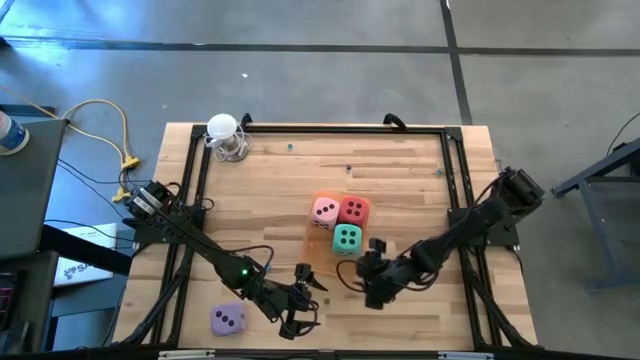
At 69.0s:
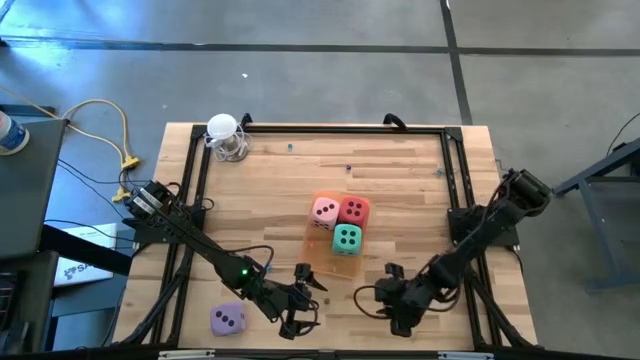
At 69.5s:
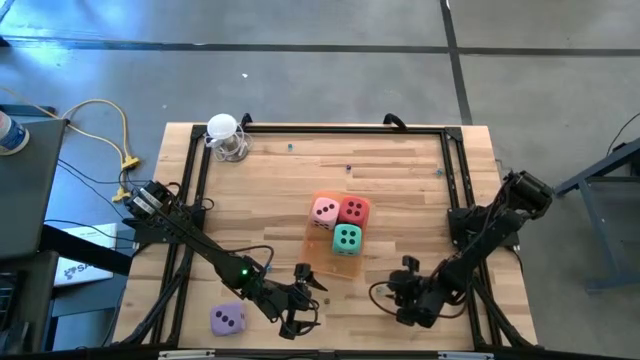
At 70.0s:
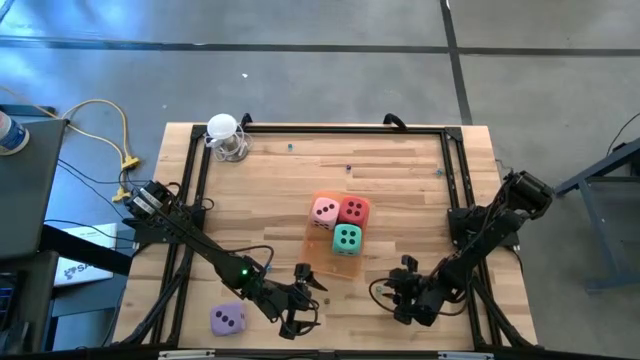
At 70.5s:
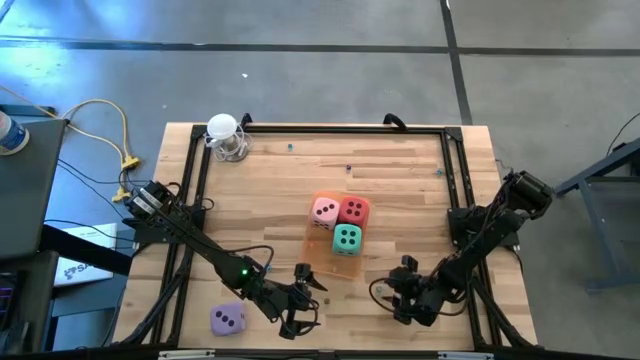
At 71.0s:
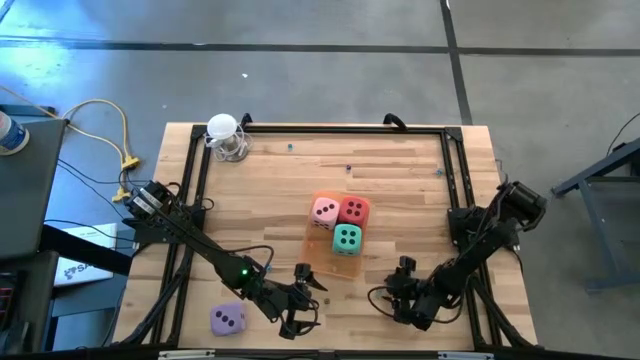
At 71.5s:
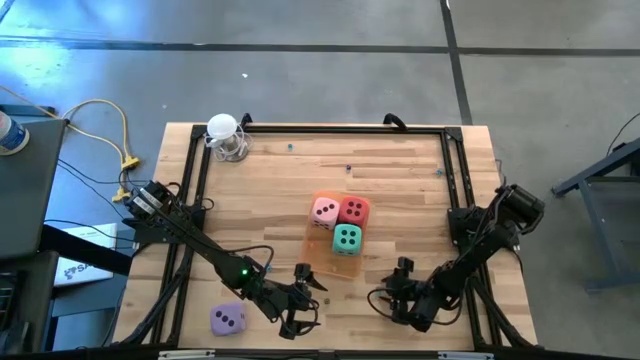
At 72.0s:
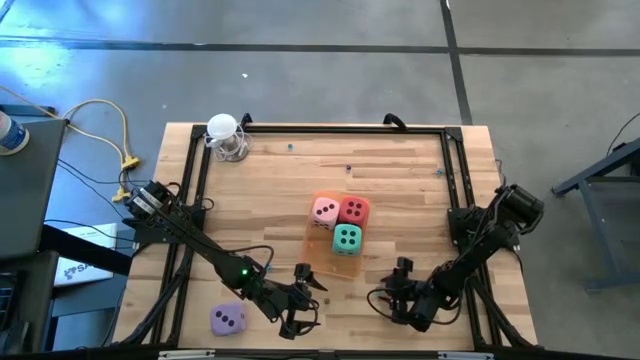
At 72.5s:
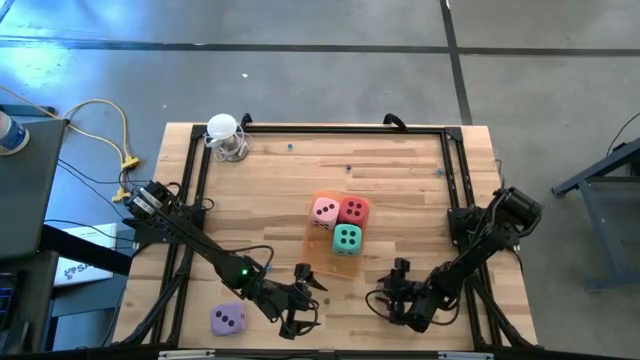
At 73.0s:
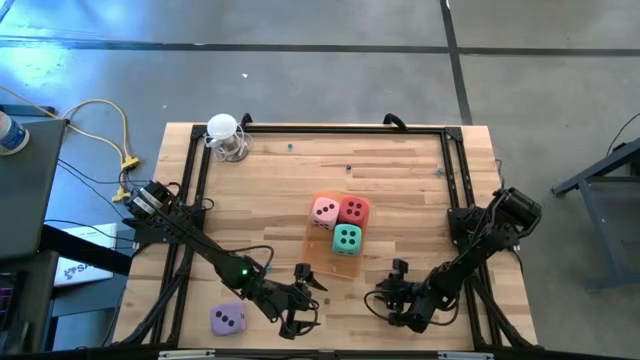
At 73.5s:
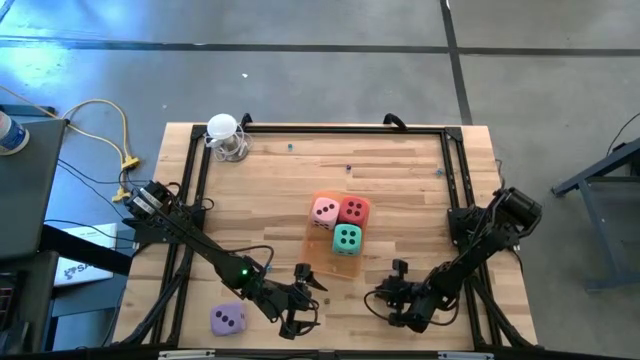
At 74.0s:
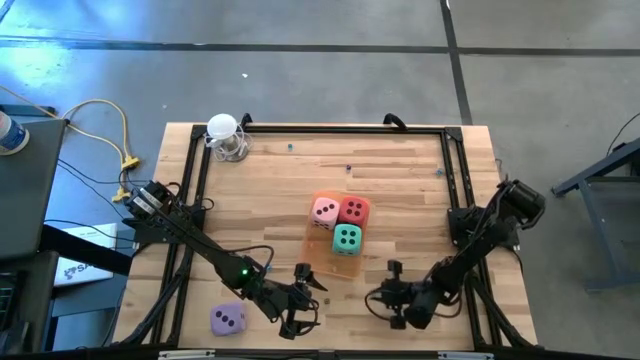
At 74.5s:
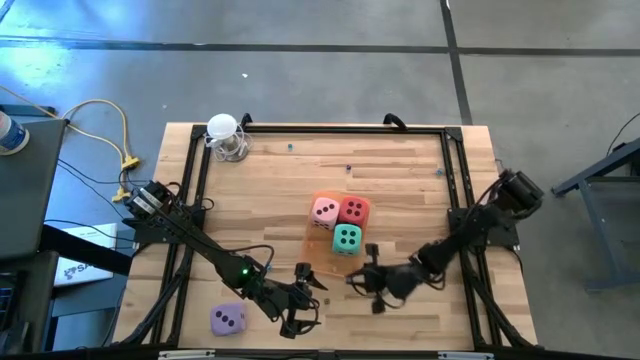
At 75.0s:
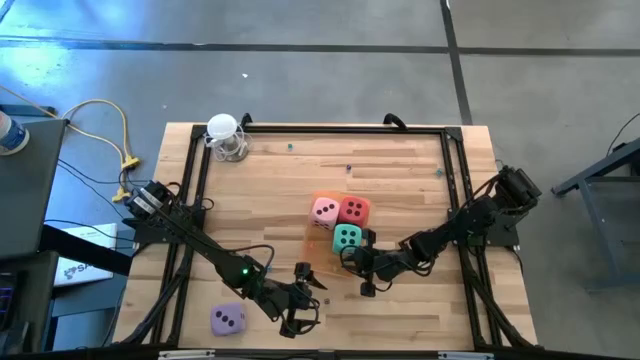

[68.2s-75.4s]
Task: Pick & Place Dice
Put the small blue die into the orange bin

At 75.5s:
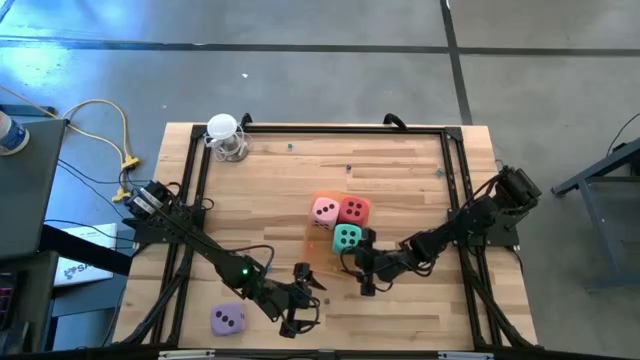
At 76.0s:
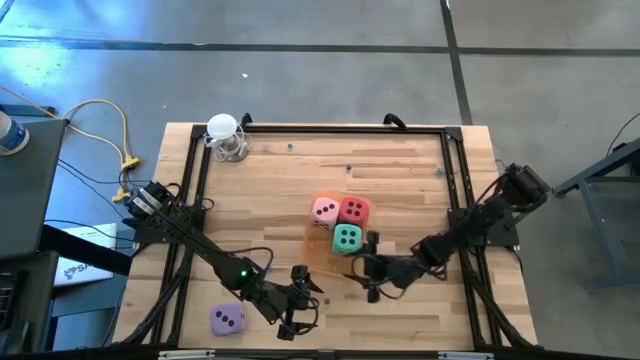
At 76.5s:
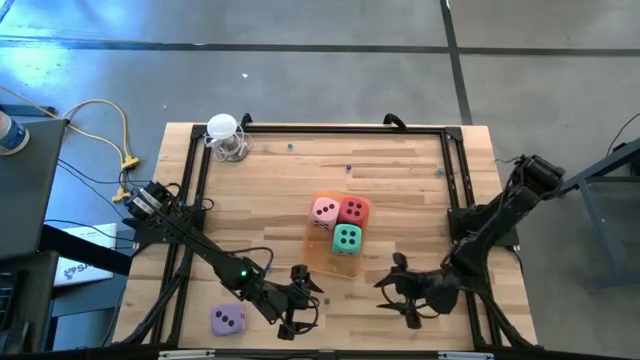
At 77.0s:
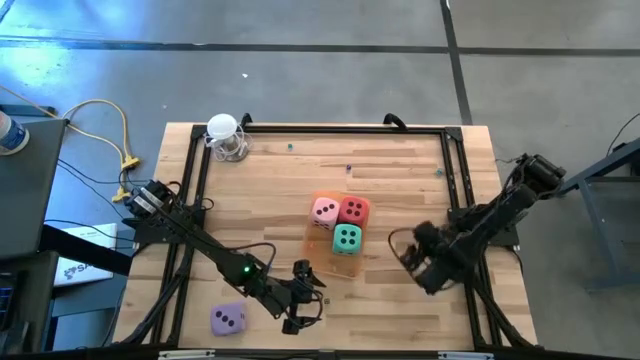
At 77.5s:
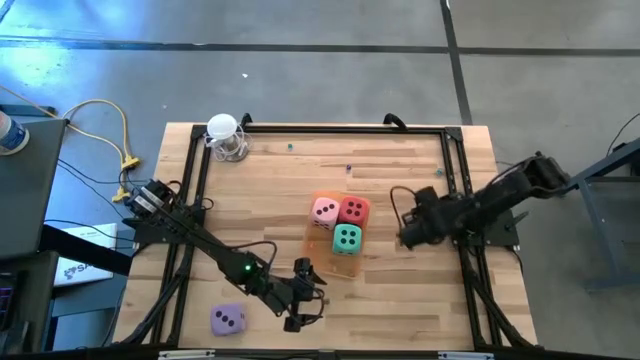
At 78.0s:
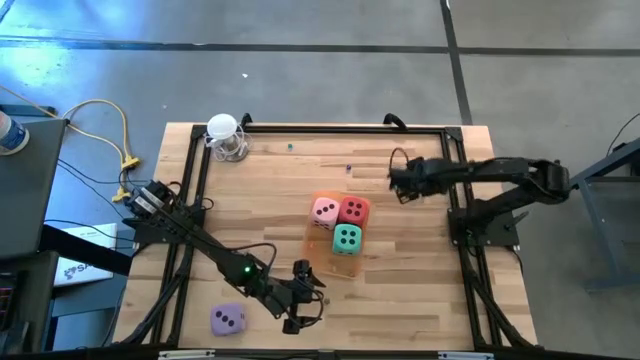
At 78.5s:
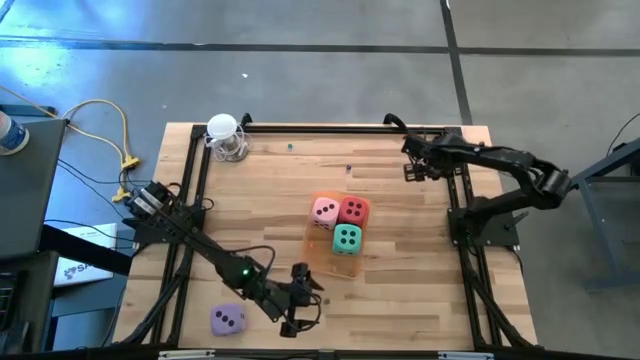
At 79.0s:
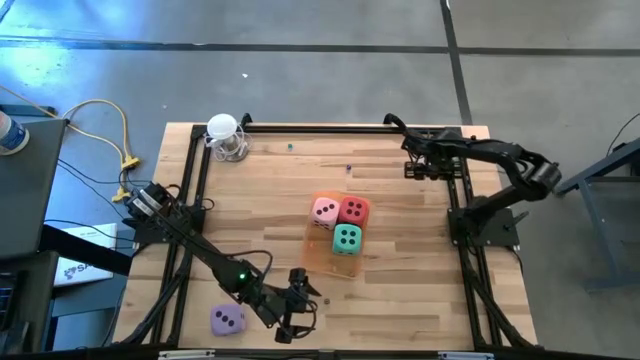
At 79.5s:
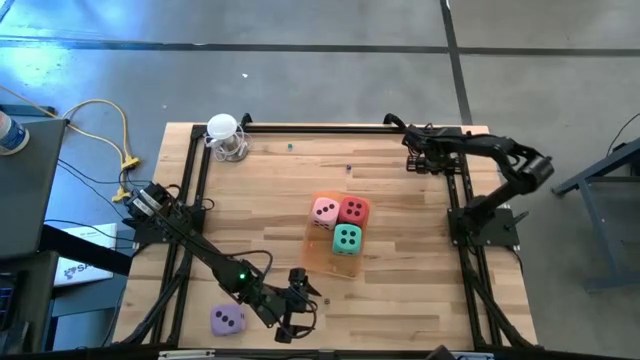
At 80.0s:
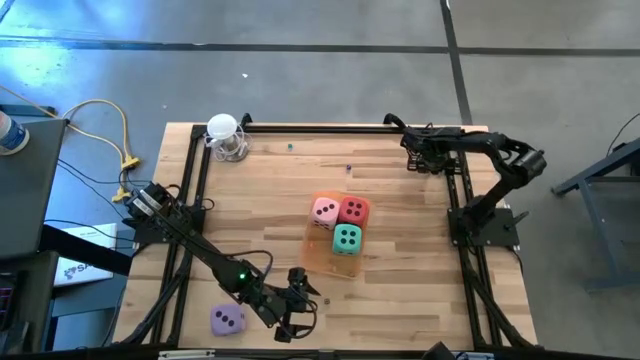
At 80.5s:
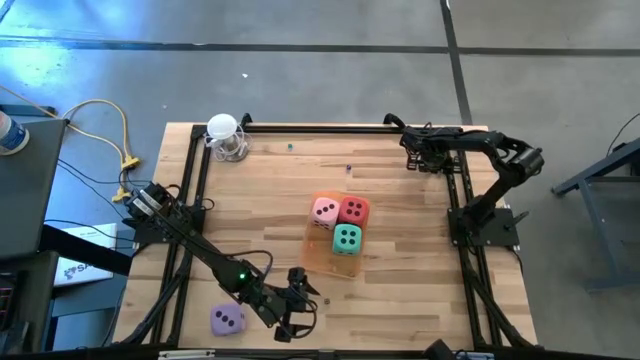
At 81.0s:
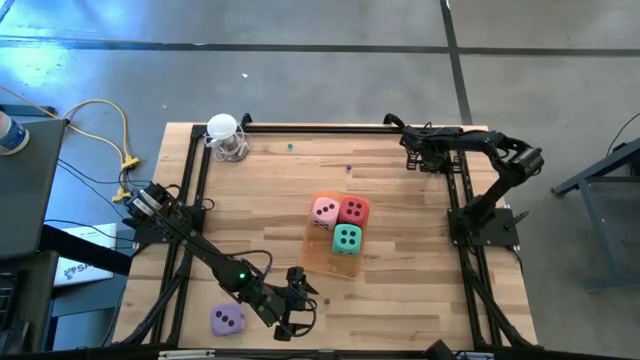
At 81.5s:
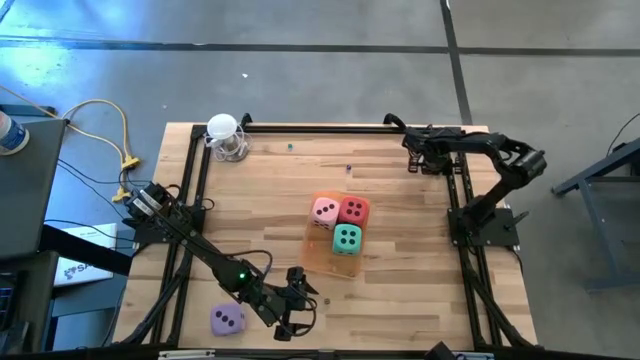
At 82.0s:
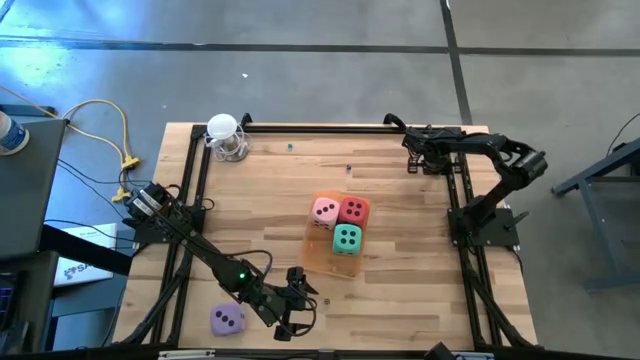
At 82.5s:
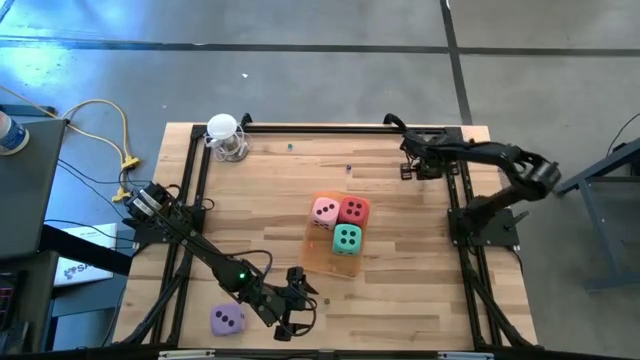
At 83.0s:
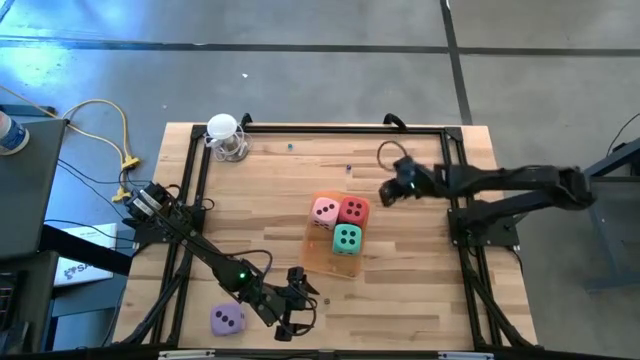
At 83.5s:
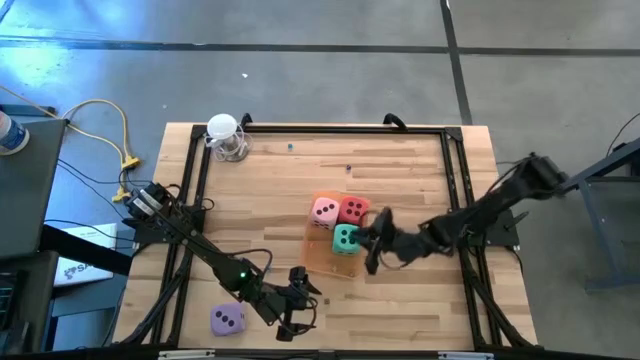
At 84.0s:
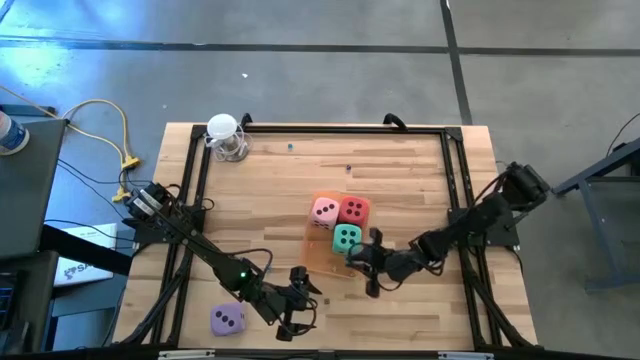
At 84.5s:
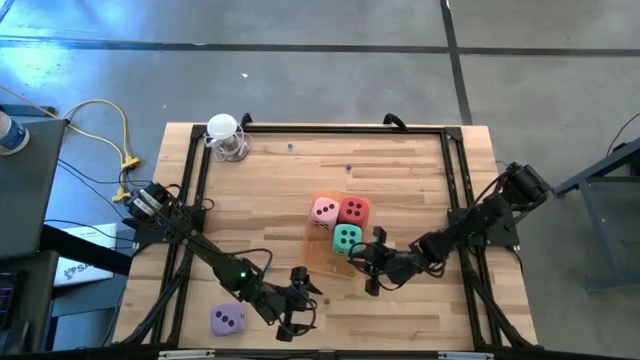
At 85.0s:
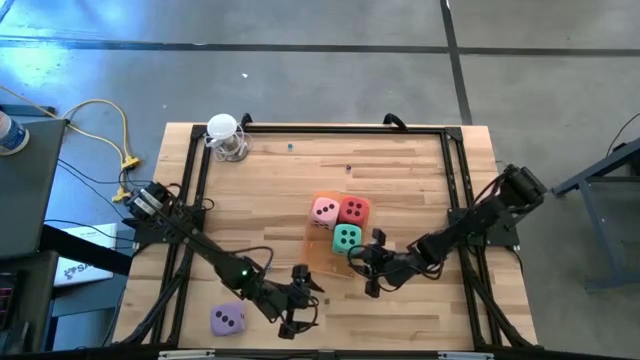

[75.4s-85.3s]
Put the small blue die into the orange bin

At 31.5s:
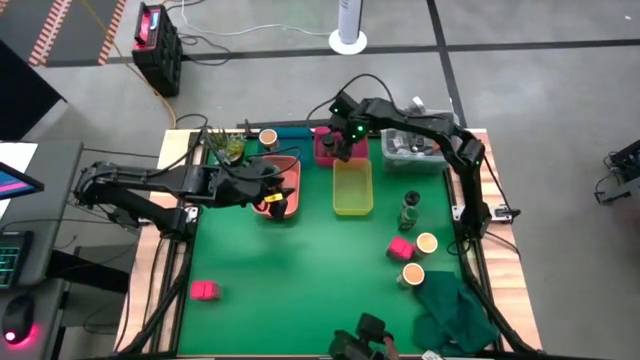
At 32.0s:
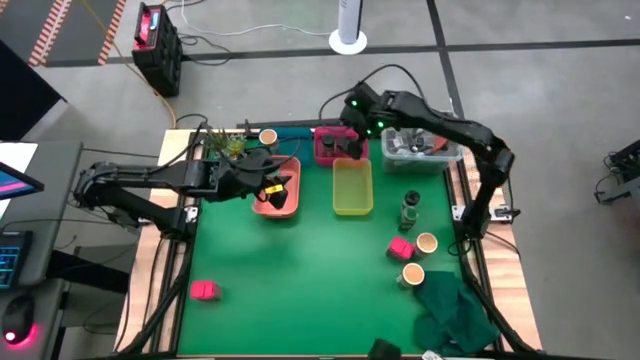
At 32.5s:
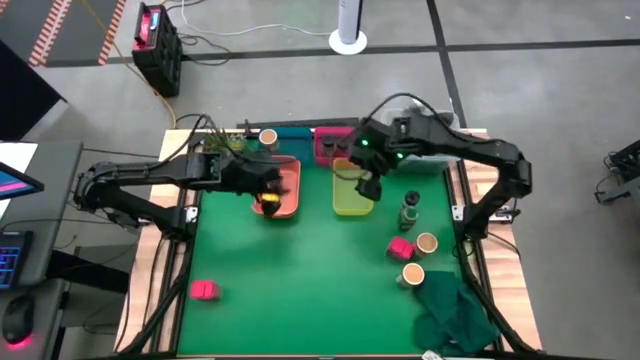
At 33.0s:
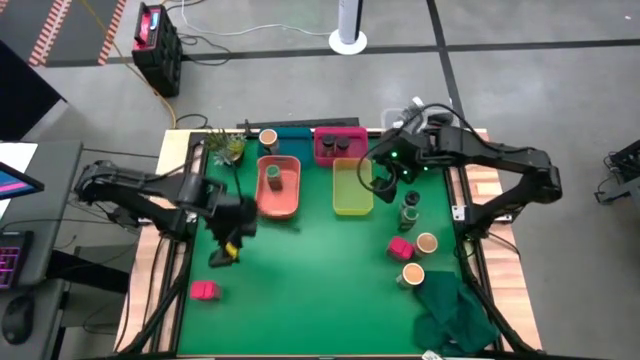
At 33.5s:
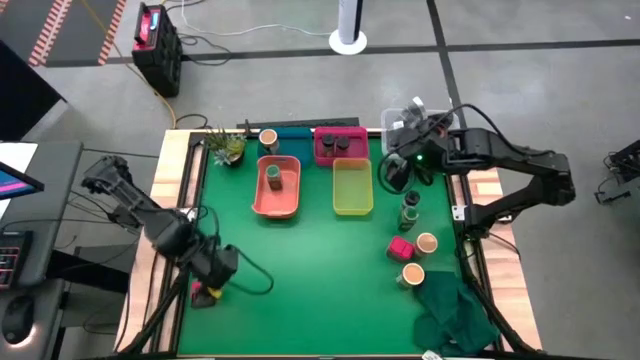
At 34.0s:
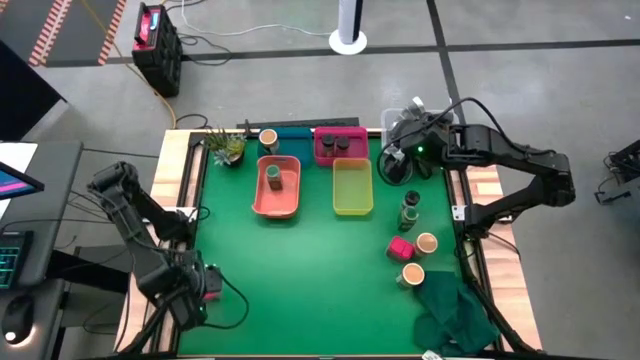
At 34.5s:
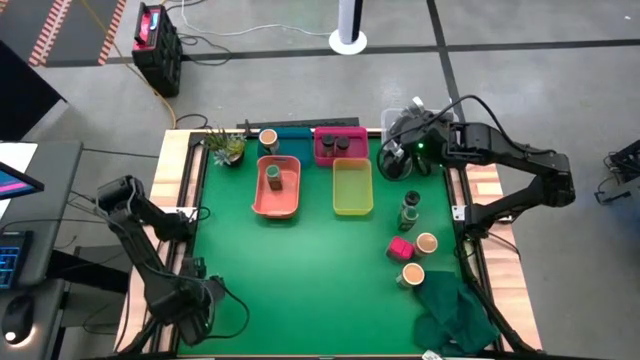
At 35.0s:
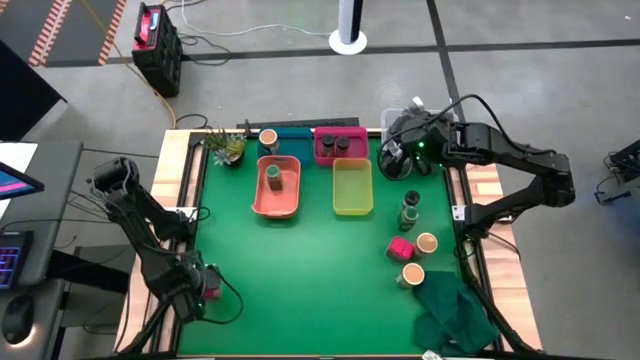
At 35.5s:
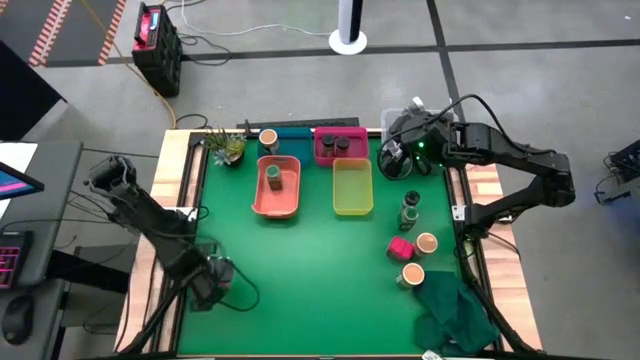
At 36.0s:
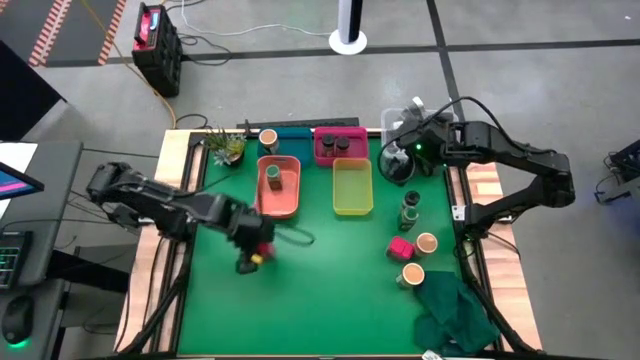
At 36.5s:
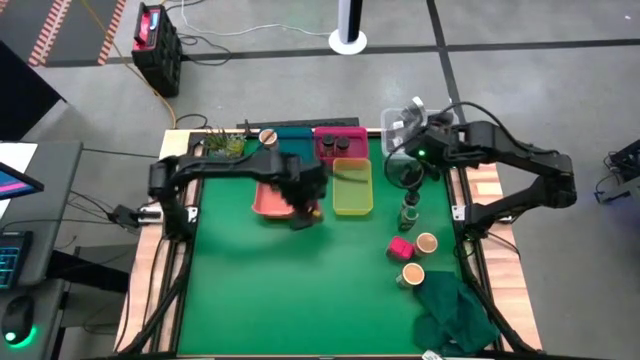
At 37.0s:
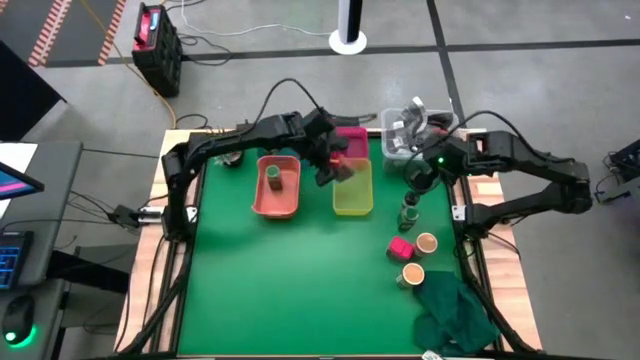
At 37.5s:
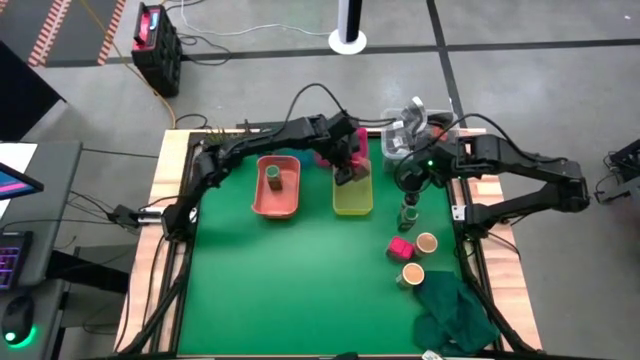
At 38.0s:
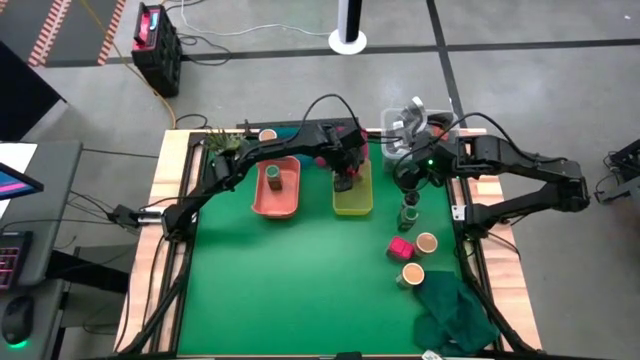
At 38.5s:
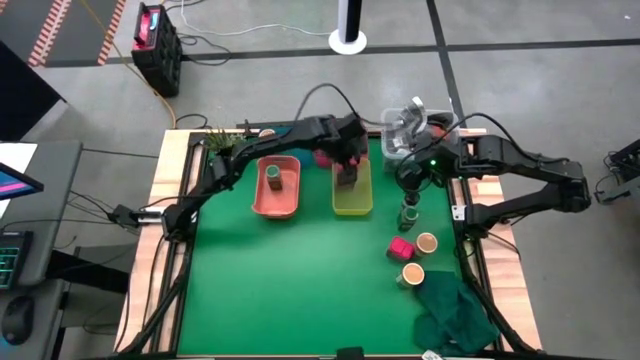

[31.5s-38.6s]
Task: Sort spices by type
Put the left red seasoning can into the yellow bin
